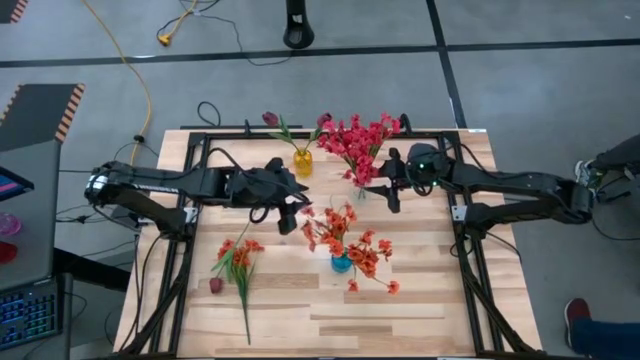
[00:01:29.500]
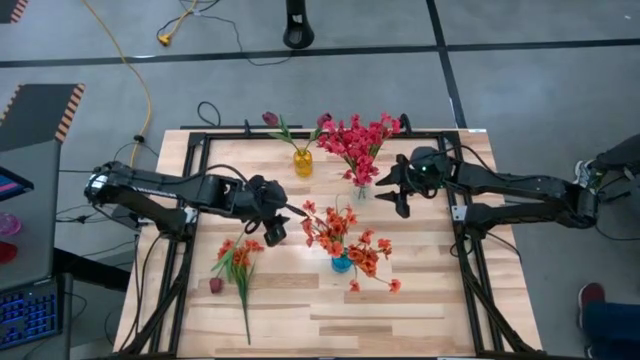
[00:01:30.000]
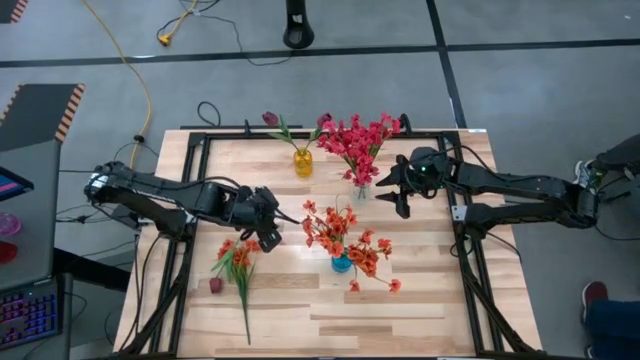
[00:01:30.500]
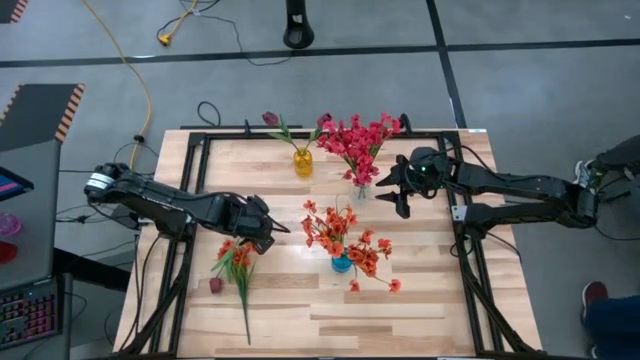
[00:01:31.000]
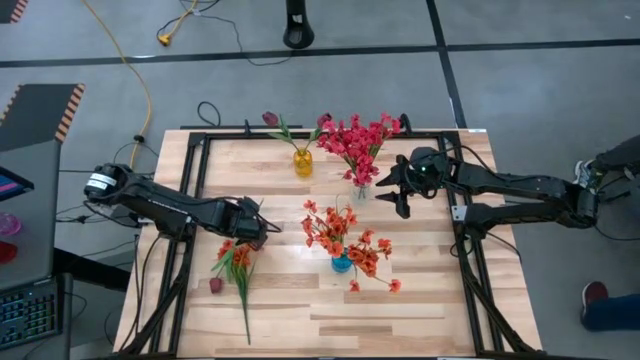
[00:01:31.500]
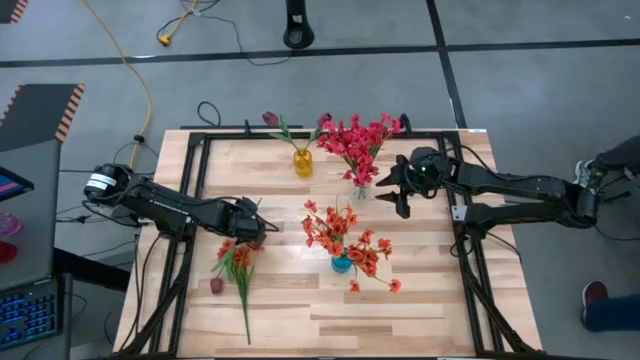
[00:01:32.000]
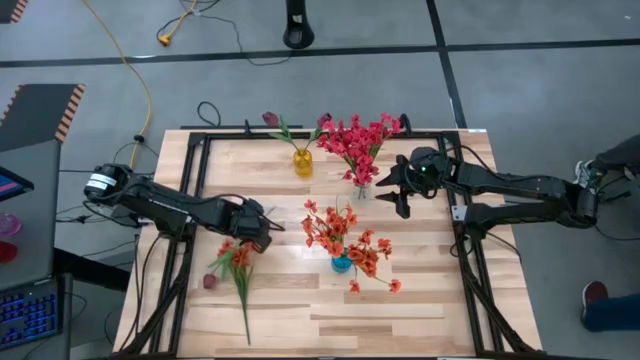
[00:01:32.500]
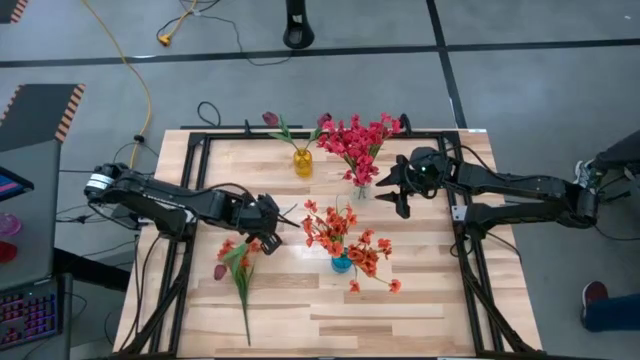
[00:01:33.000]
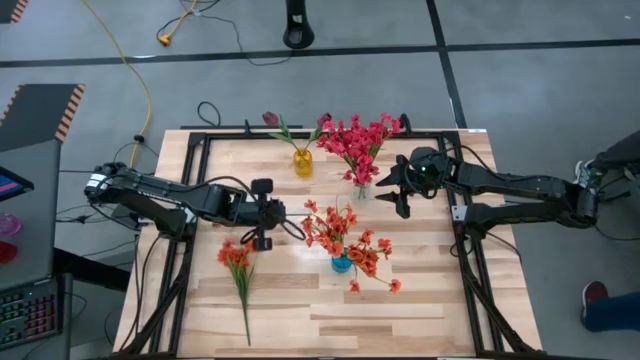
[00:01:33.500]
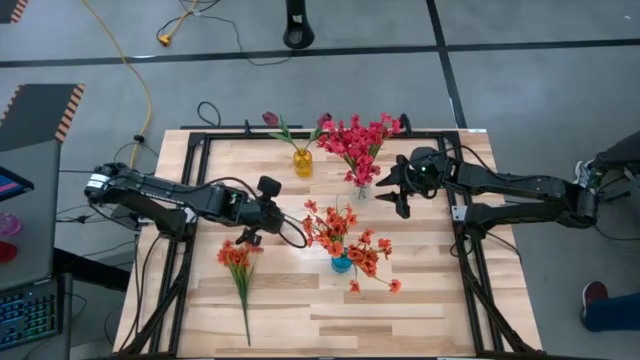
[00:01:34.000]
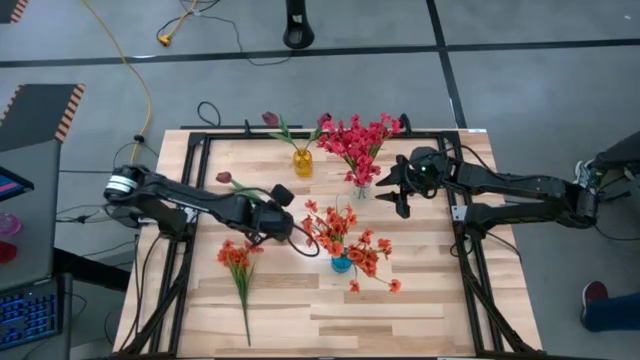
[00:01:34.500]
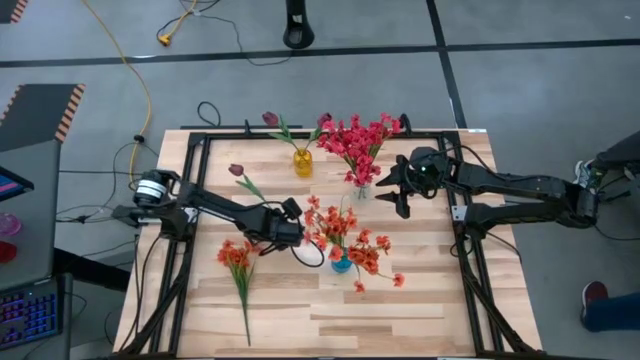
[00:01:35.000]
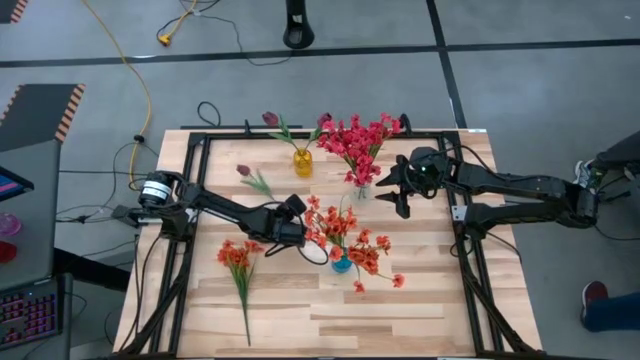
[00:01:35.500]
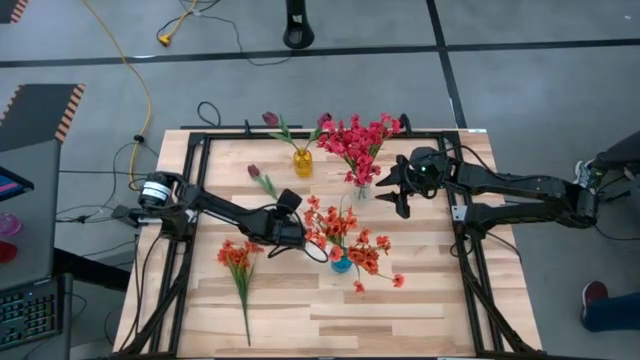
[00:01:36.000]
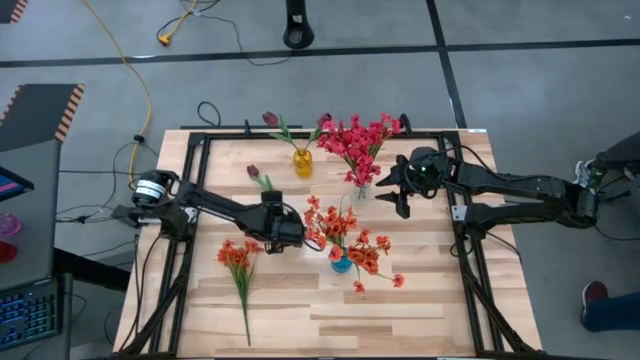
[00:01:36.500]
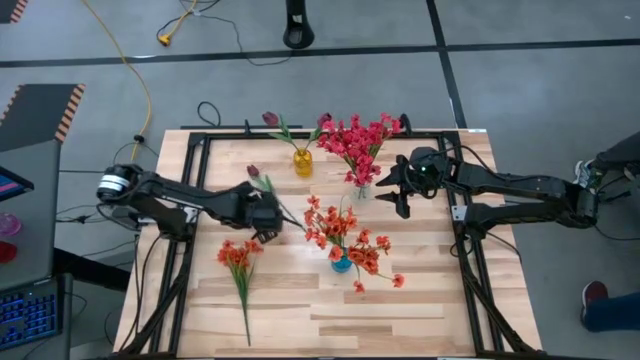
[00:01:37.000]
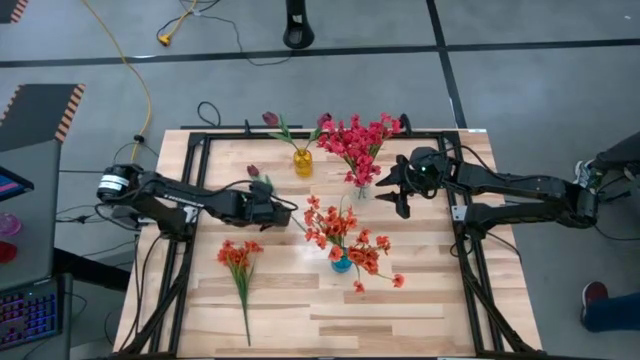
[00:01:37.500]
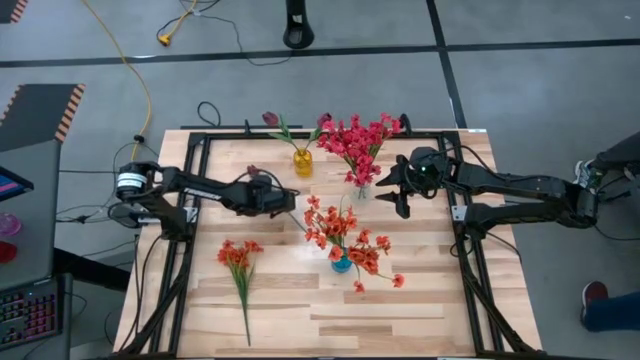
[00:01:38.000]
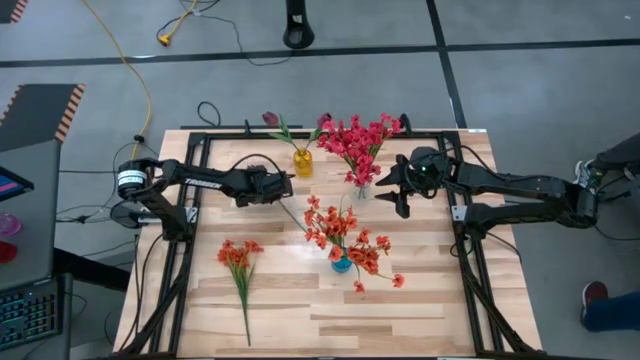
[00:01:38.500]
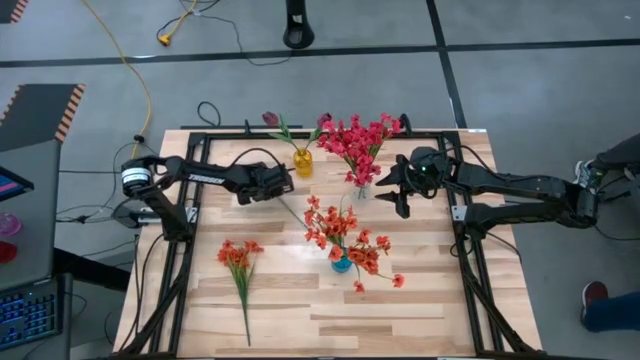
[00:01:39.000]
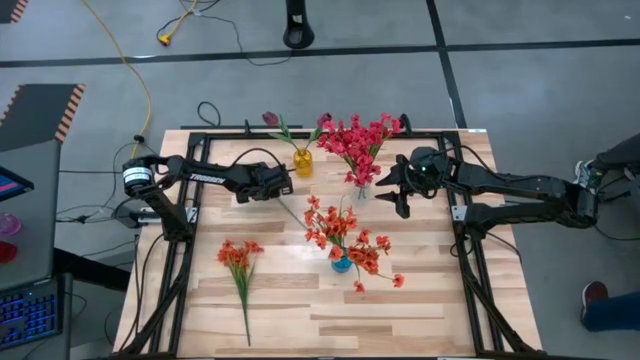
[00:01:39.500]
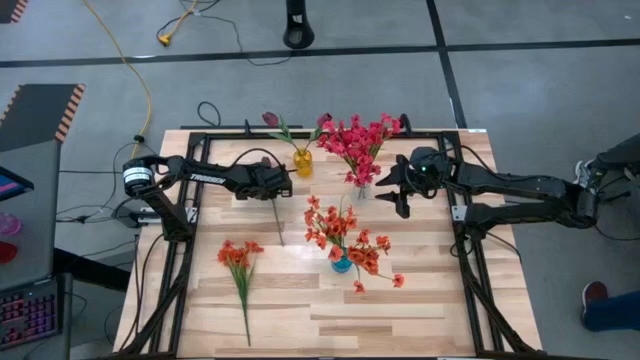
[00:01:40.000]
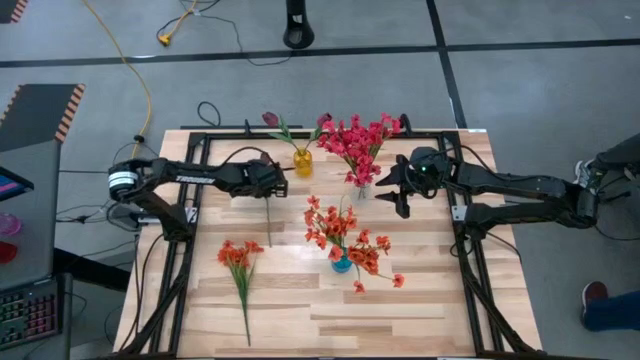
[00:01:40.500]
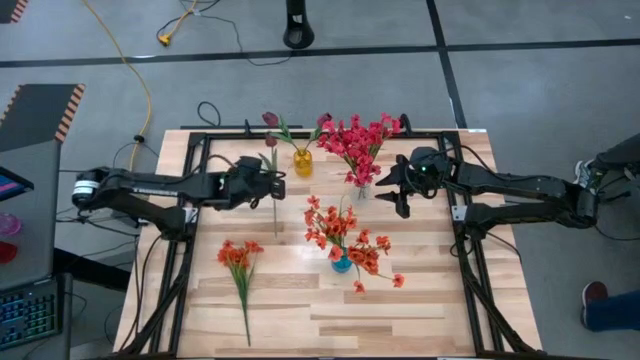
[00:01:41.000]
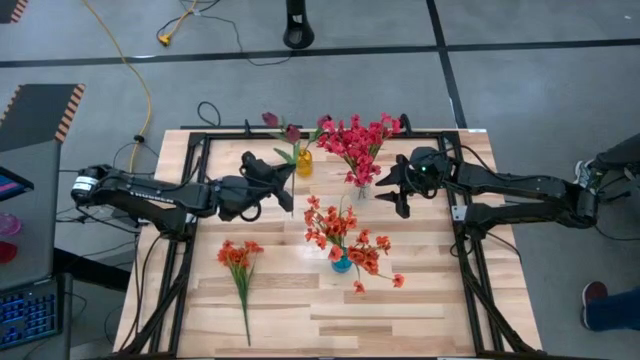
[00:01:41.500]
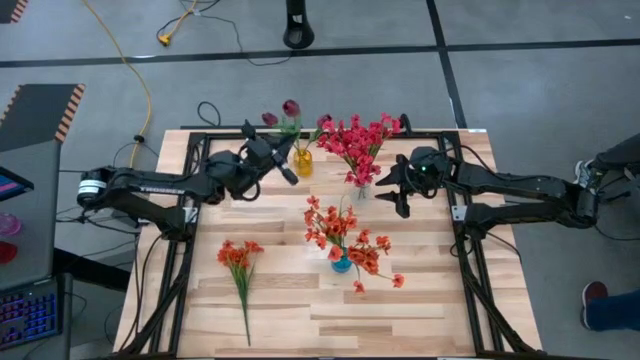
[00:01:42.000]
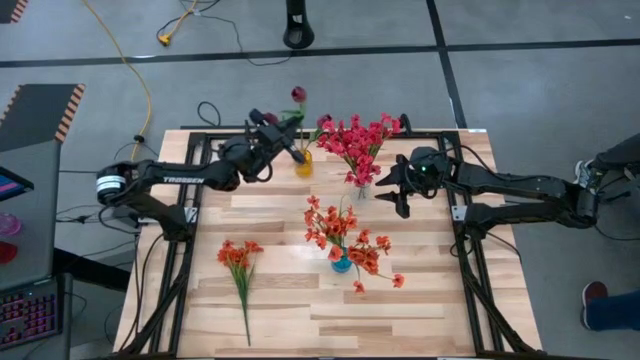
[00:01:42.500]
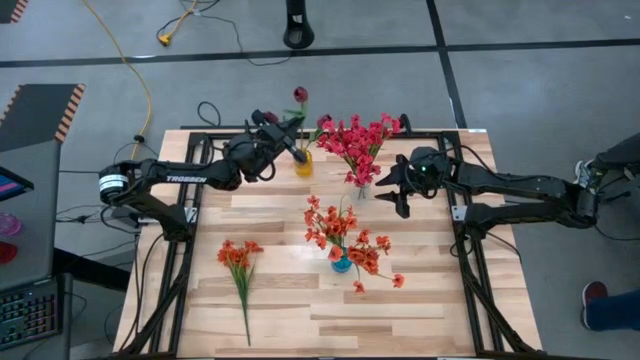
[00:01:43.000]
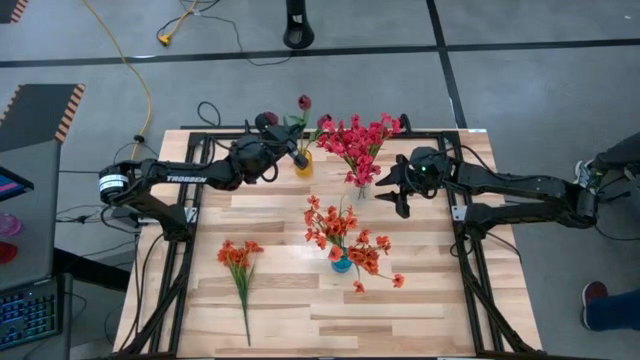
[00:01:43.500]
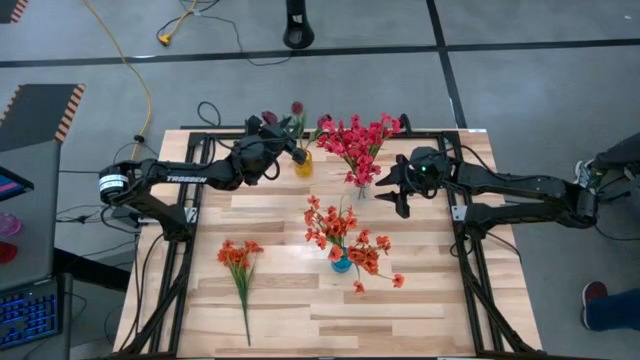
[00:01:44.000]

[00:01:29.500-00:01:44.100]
Task: Sort flowers into vase by color
Put the dark red flower into the yellow vase

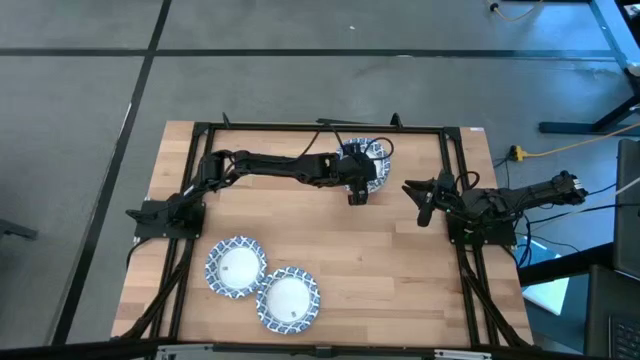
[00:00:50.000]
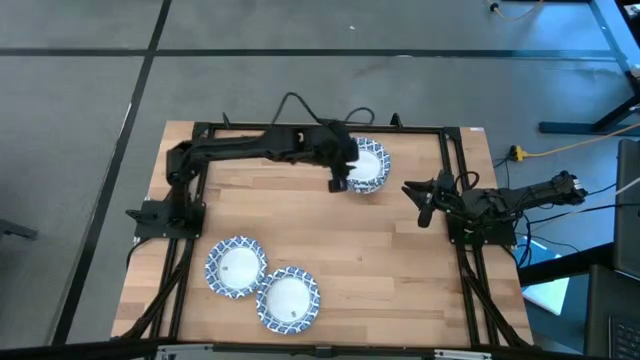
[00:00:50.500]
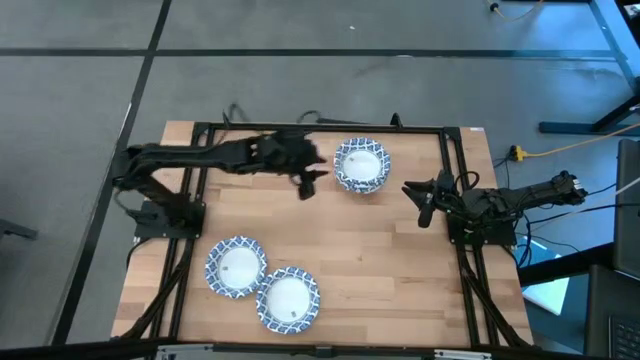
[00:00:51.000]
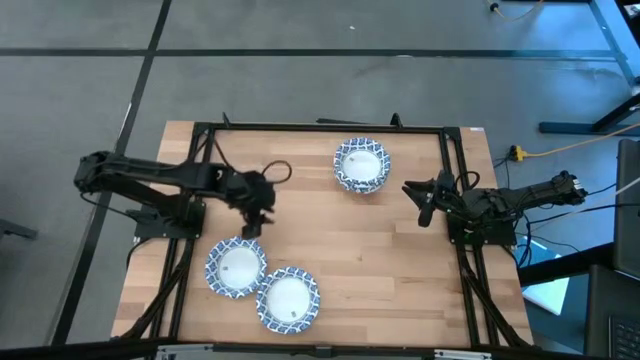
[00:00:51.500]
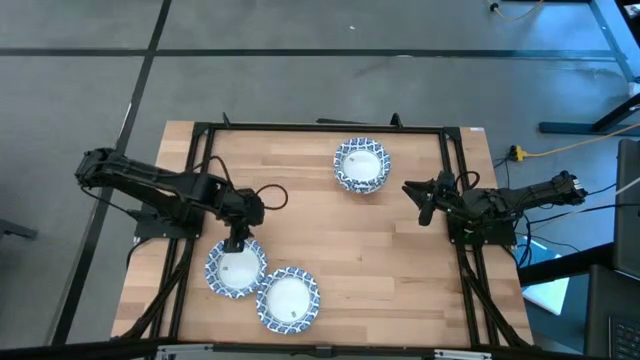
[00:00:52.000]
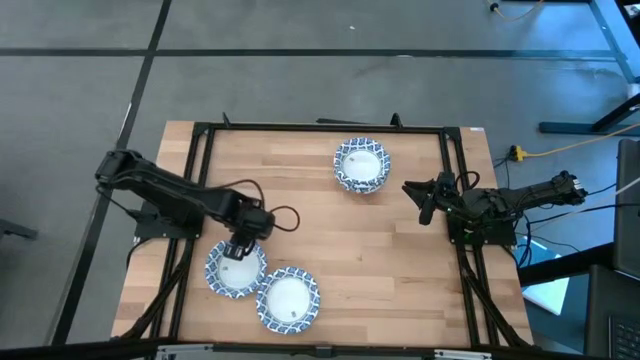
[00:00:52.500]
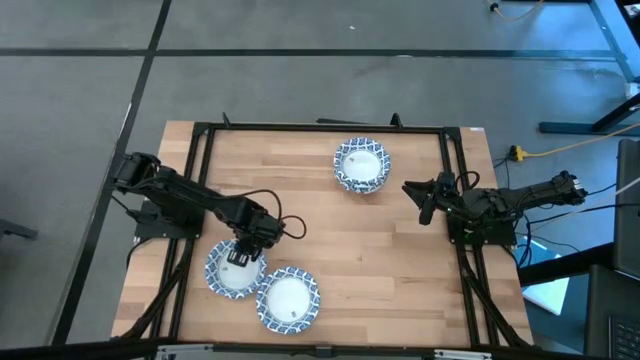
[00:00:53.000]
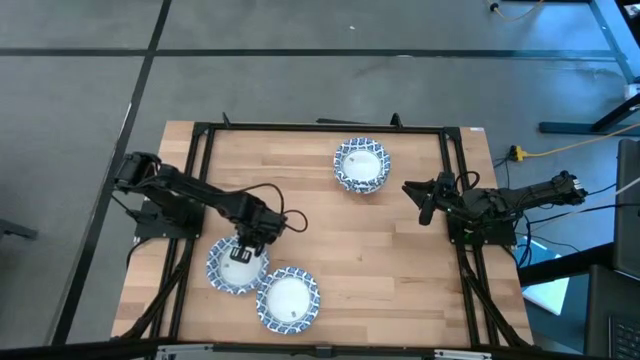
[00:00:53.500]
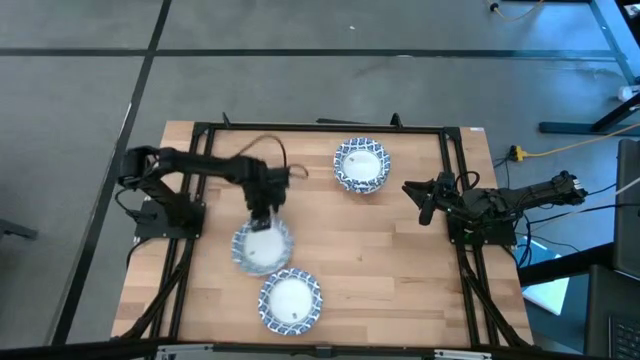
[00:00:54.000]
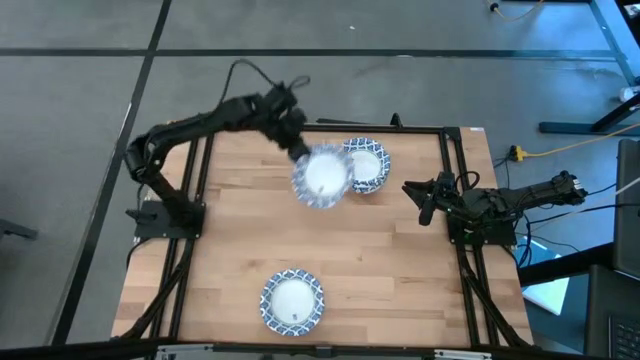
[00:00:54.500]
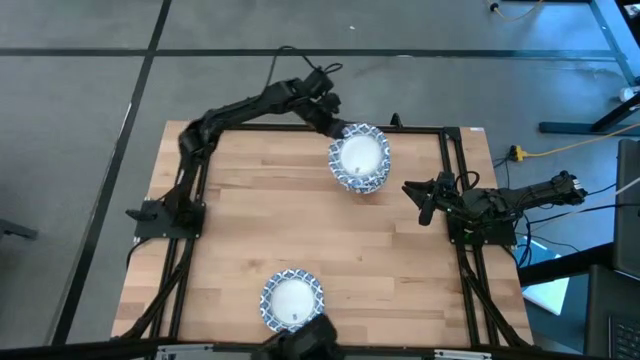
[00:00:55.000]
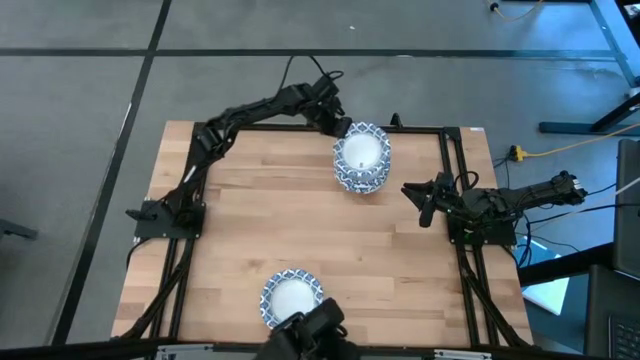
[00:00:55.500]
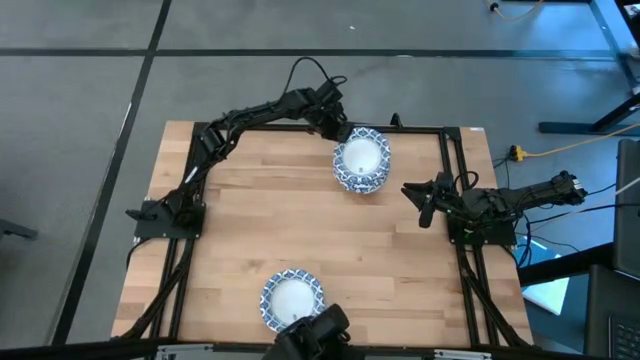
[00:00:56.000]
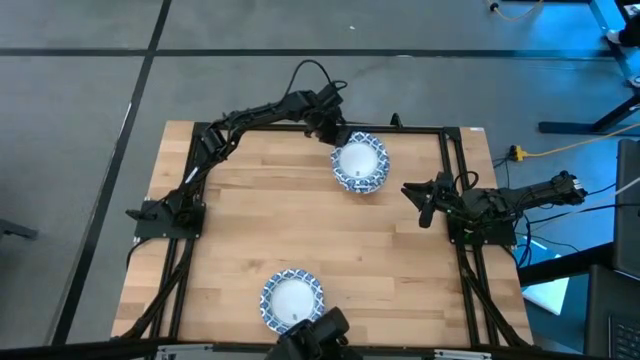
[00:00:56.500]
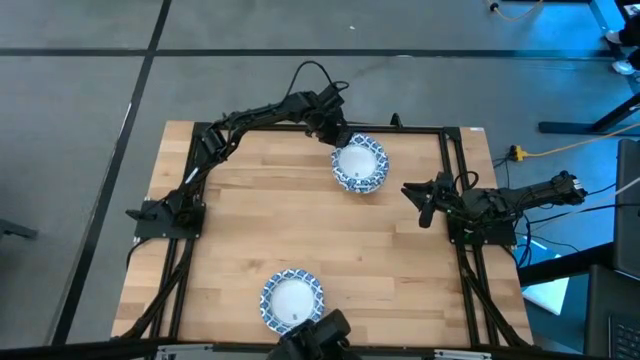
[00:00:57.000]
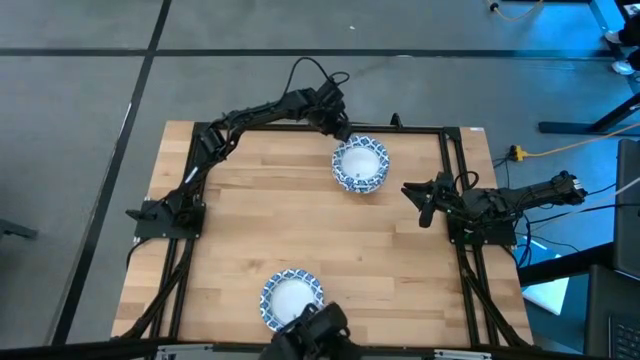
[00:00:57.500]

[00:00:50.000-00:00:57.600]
Task: Nest bowls inside each other
Stack the white bowl on the white bowl
